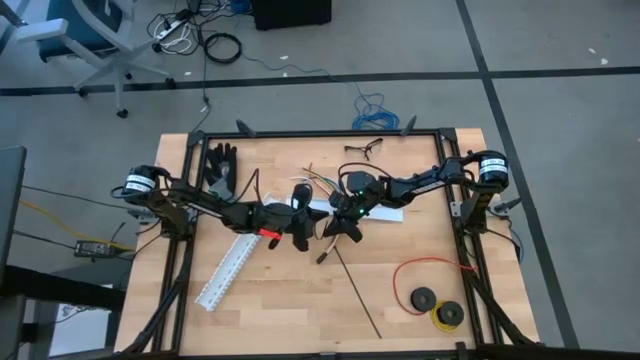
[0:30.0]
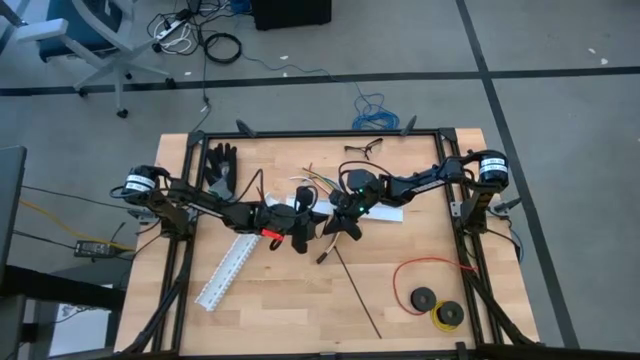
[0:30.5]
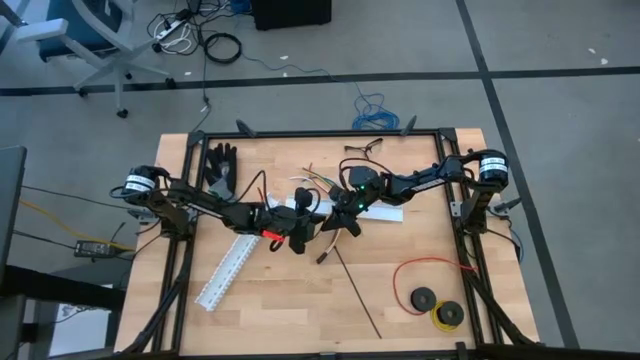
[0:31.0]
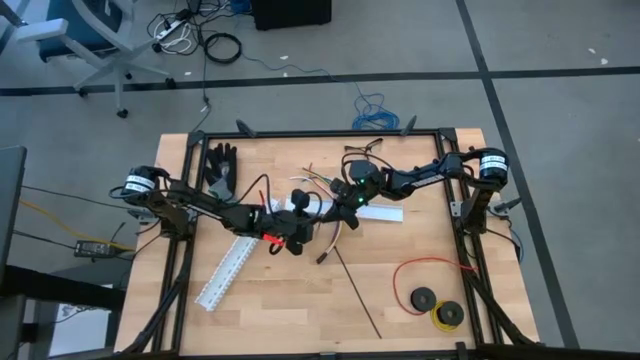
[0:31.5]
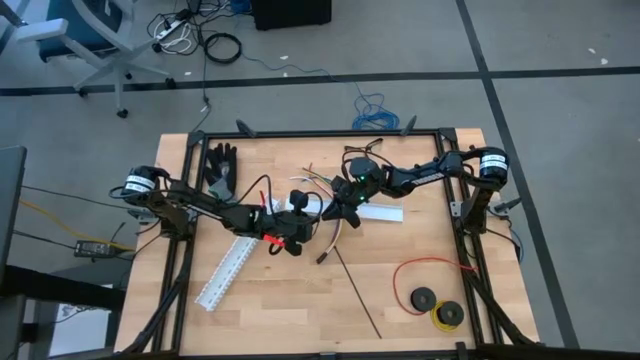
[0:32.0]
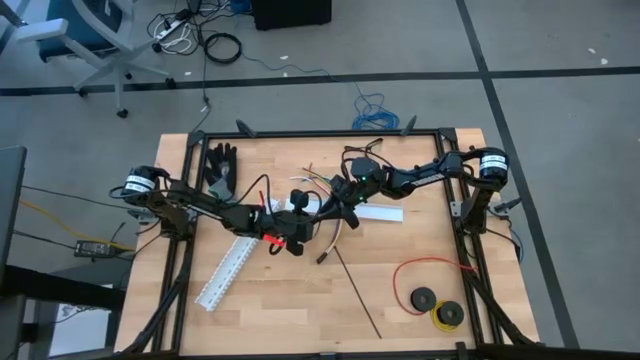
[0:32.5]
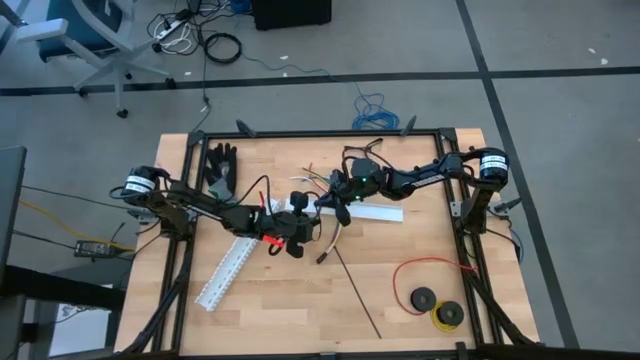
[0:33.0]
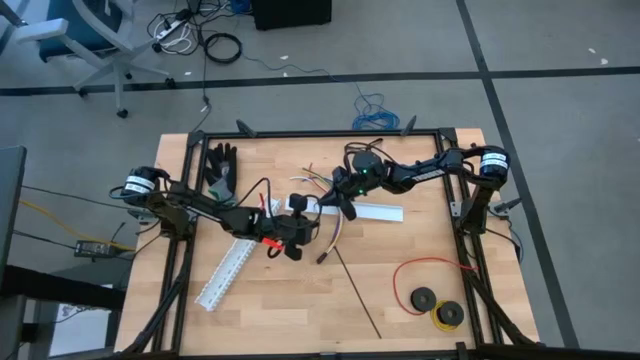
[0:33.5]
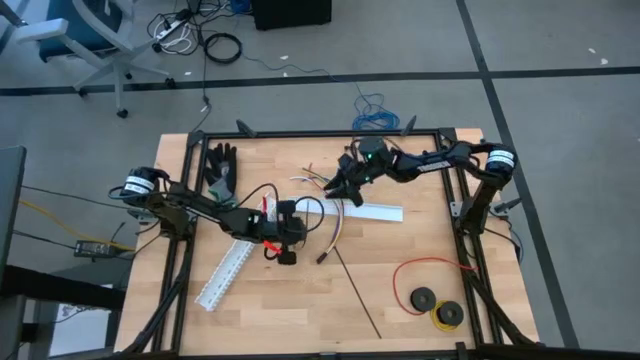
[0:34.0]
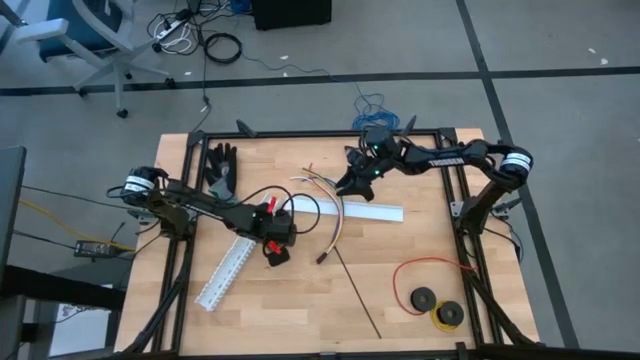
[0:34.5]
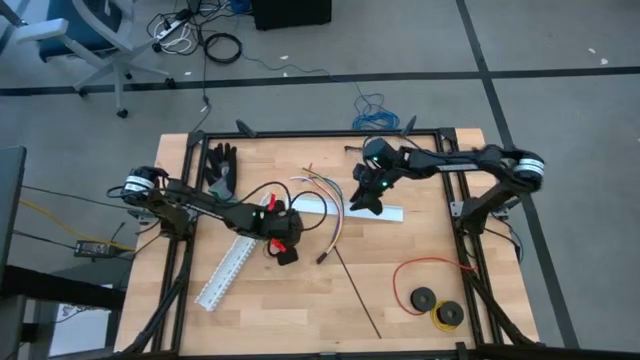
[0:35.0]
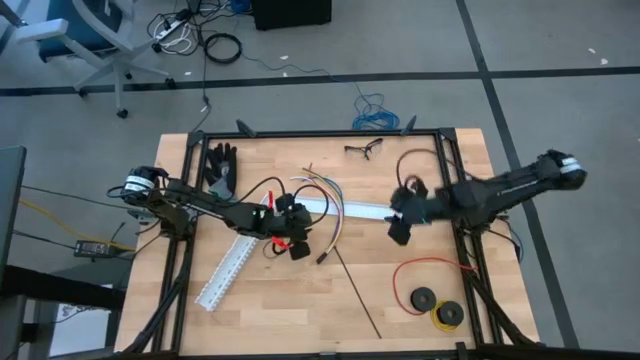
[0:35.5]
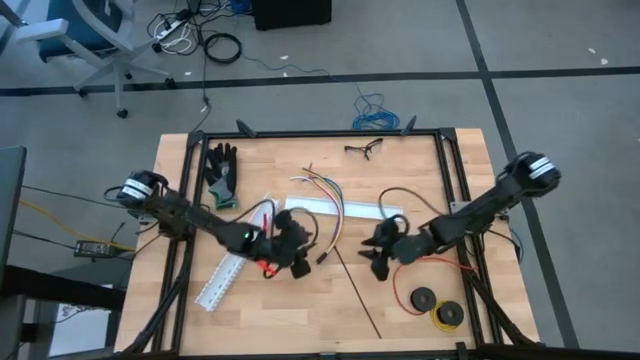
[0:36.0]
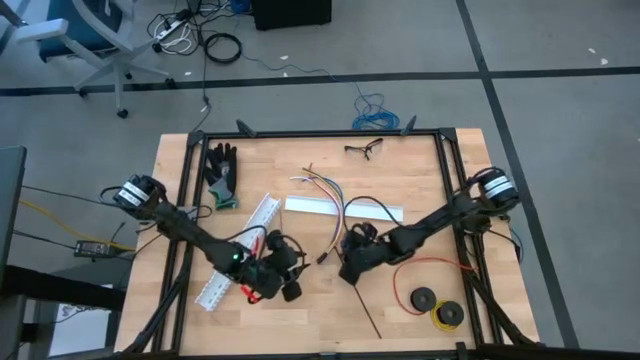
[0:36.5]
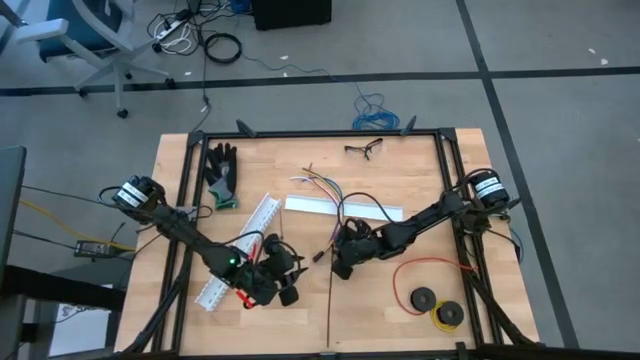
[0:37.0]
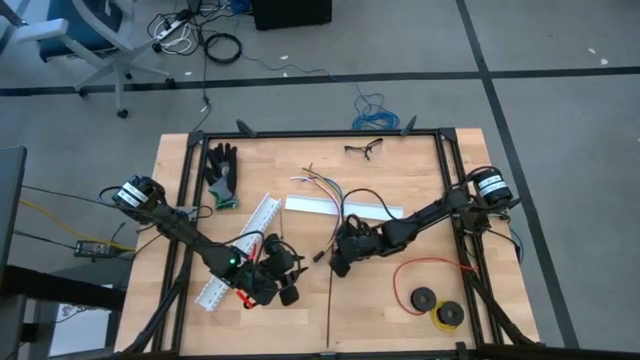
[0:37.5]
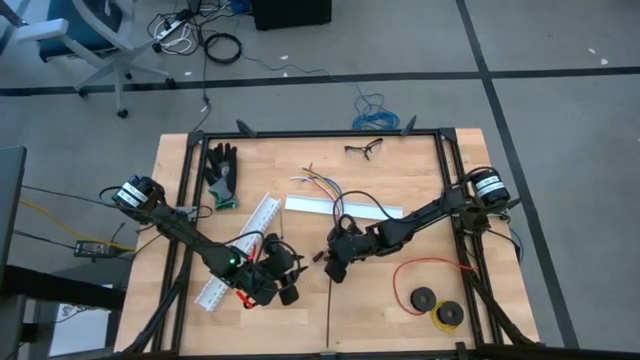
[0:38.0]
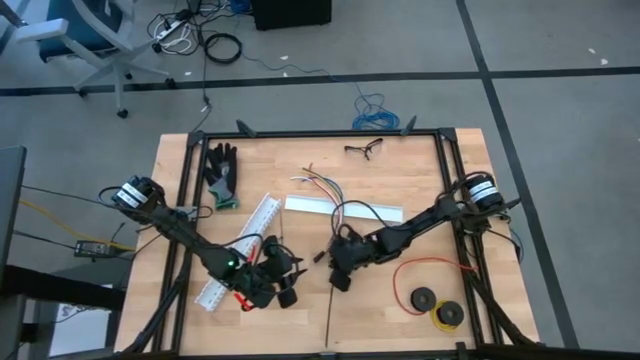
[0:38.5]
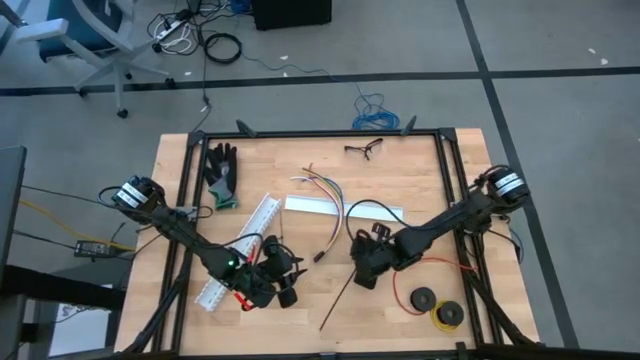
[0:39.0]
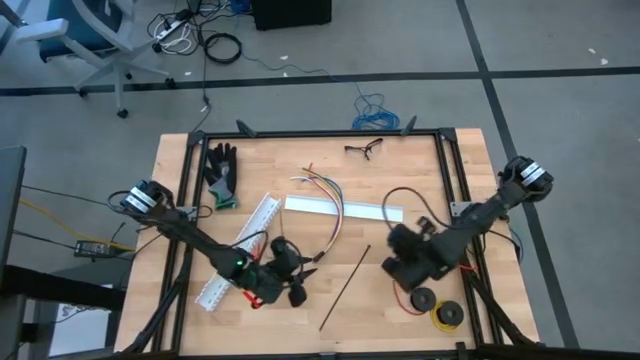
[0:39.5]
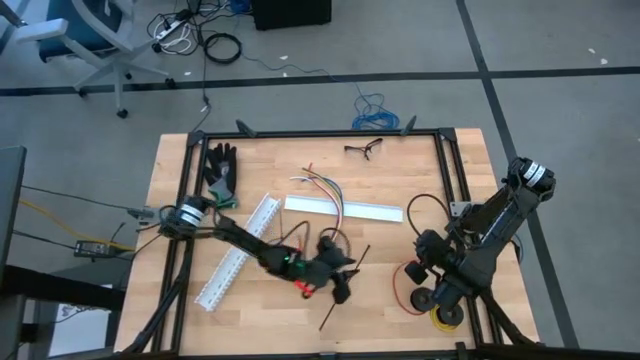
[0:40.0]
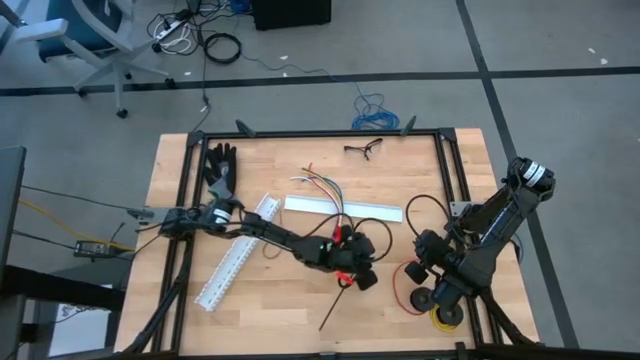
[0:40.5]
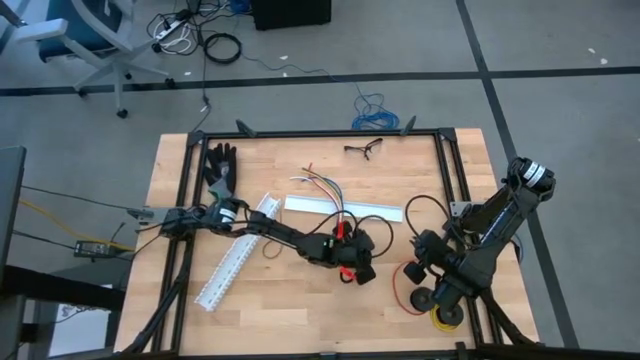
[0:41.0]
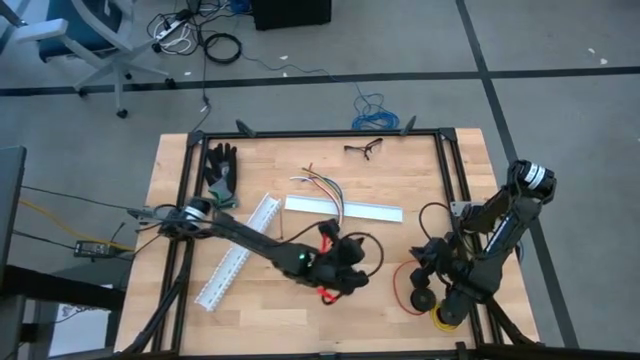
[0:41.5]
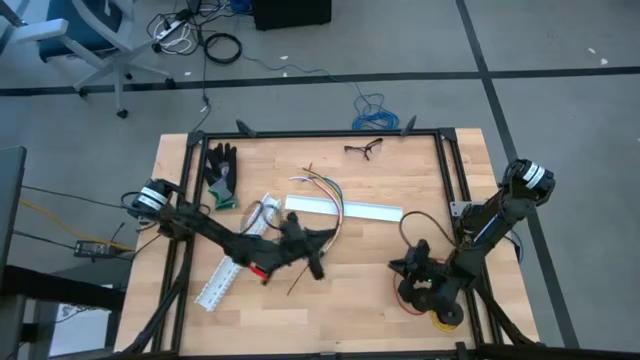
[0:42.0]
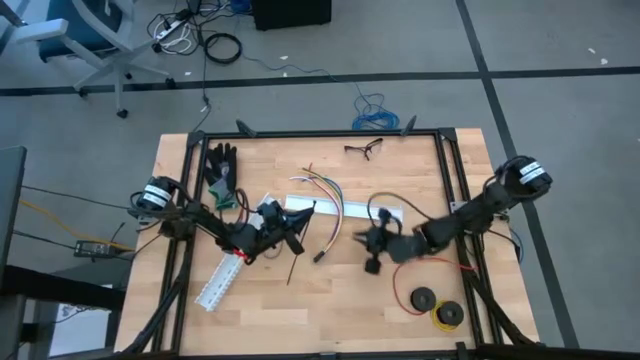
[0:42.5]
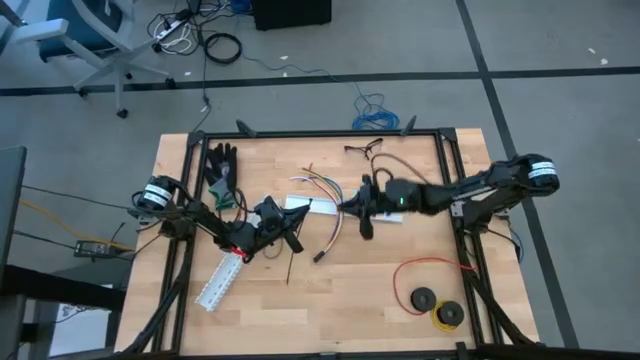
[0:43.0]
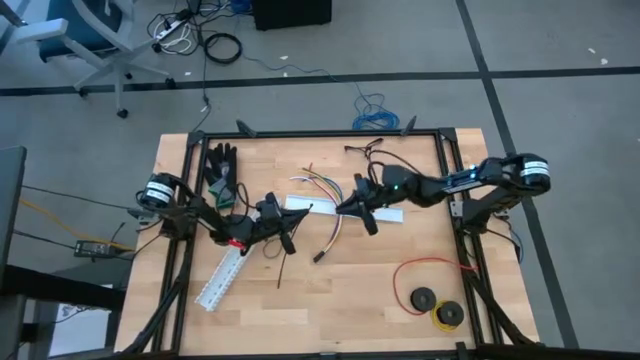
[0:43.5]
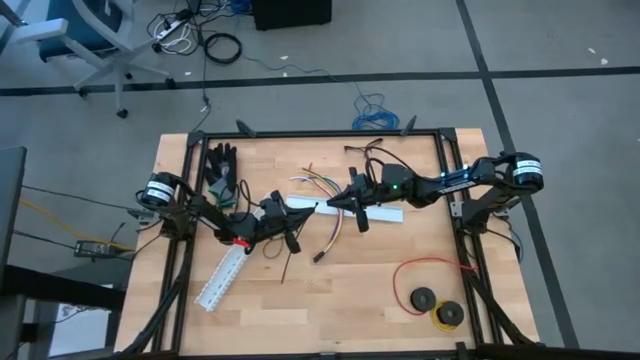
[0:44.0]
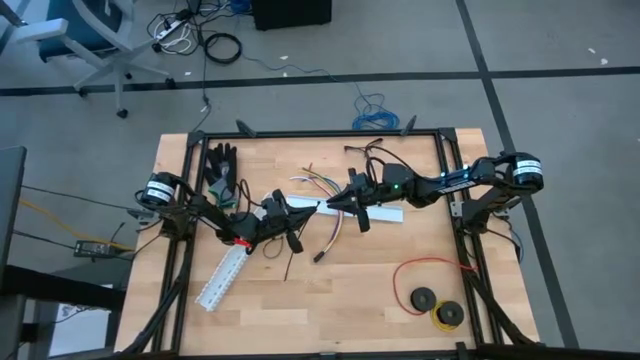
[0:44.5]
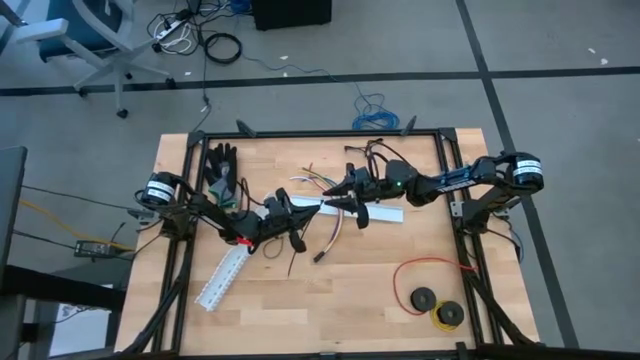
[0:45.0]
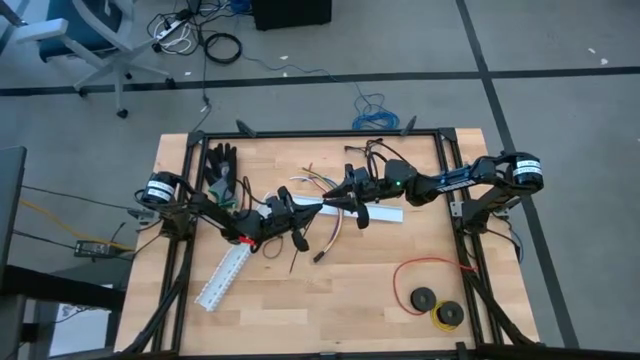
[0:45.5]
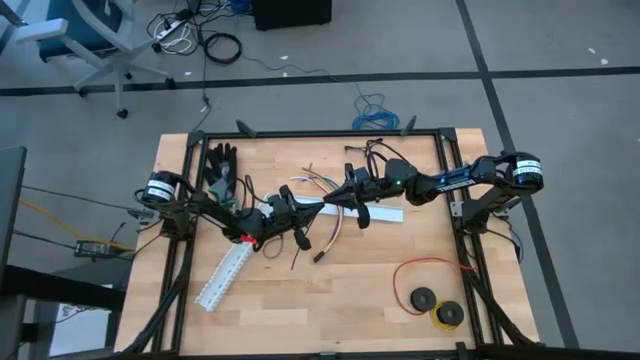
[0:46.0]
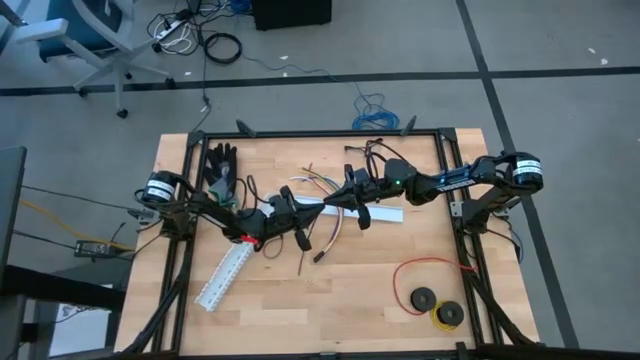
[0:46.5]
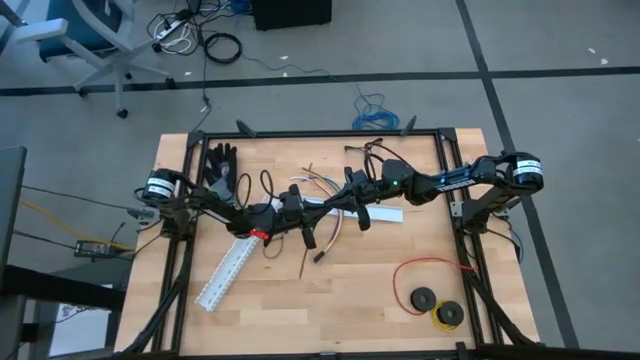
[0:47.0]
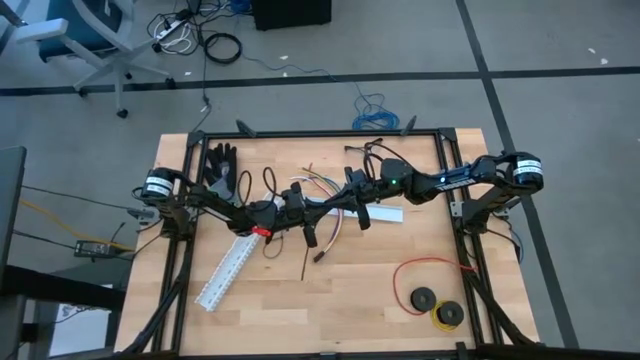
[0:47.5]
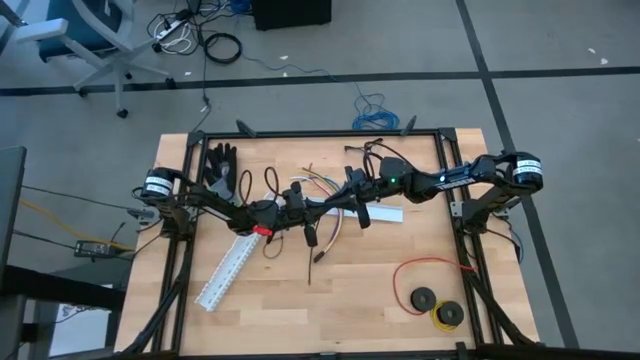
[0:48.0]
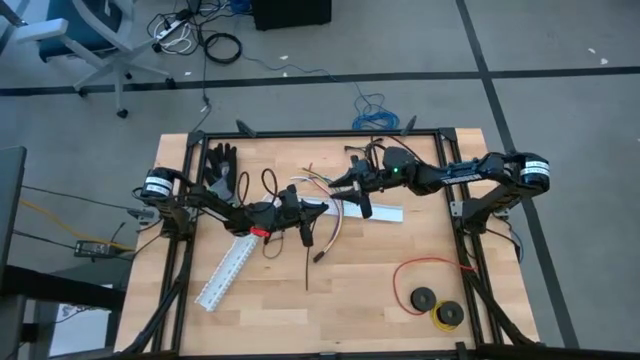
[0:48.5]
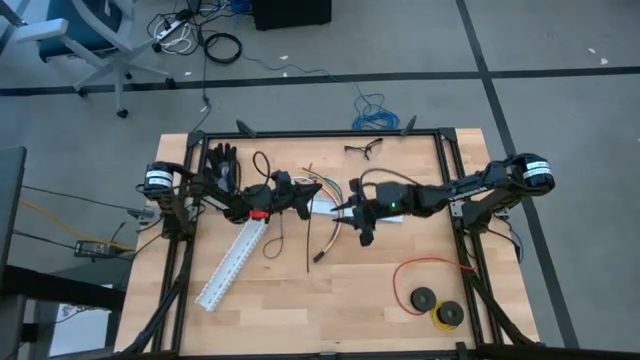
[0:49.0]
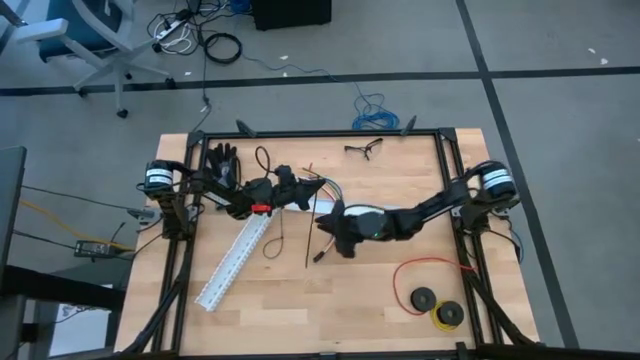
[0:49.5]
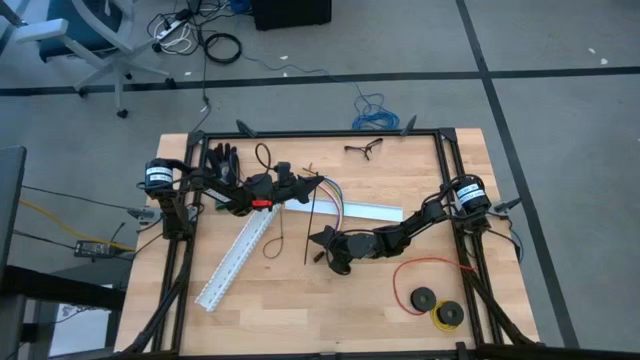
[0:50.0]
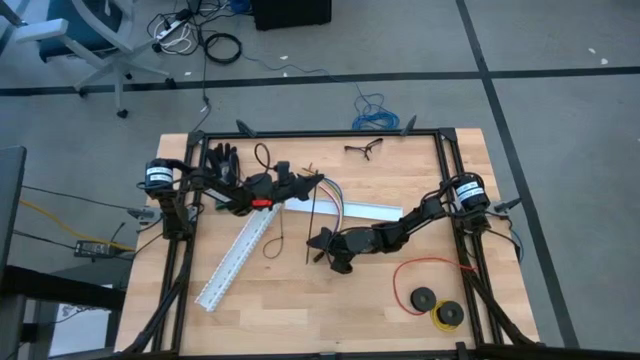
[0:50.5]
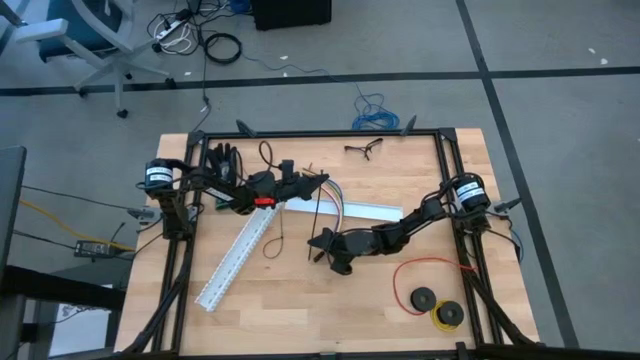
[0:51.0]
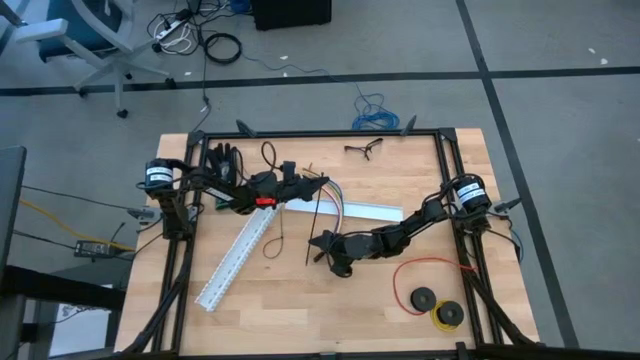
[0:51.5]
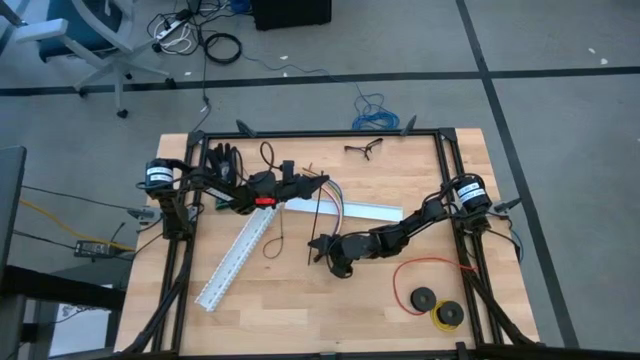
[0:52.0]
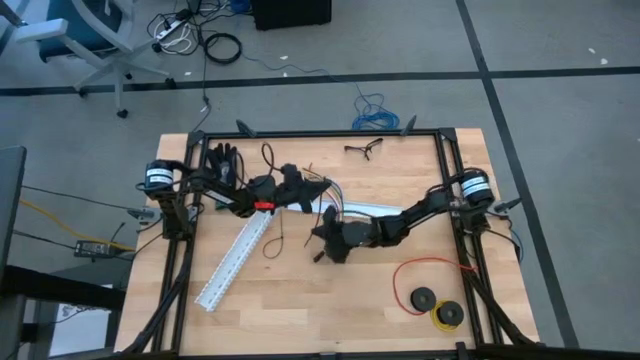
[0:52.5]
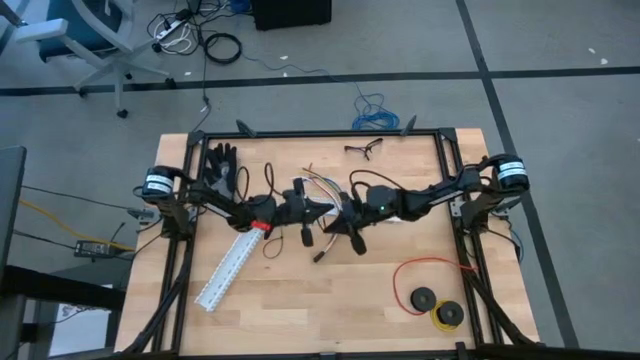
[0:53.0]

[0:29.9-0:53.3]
Task: Ziptie cables
Wrap the cables together using a zip tie
